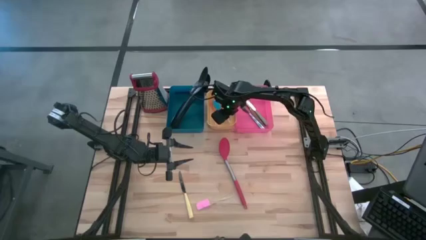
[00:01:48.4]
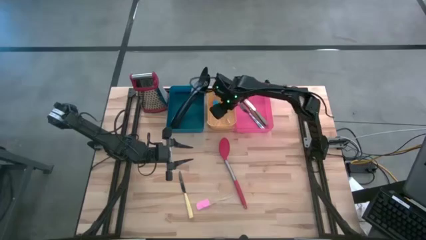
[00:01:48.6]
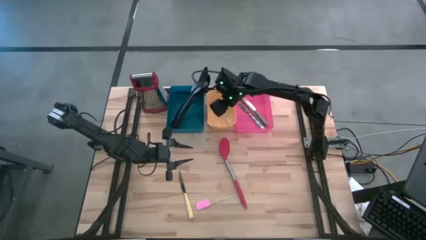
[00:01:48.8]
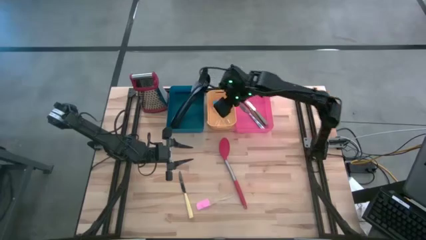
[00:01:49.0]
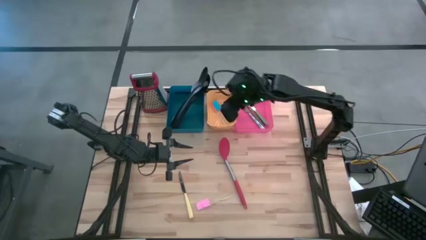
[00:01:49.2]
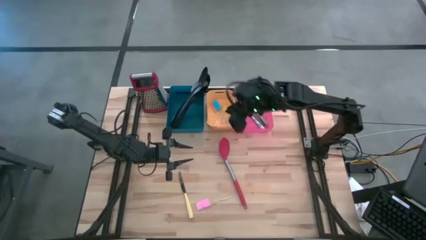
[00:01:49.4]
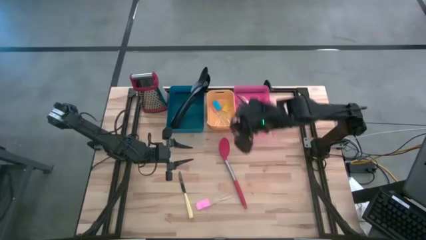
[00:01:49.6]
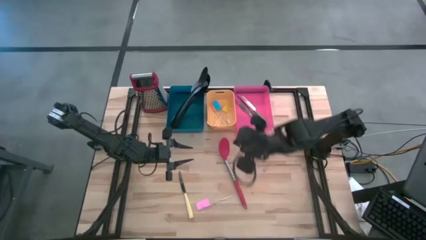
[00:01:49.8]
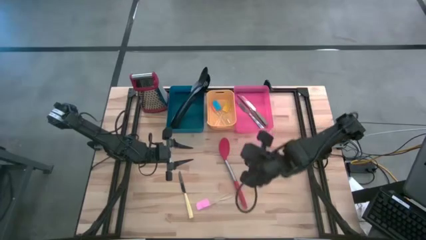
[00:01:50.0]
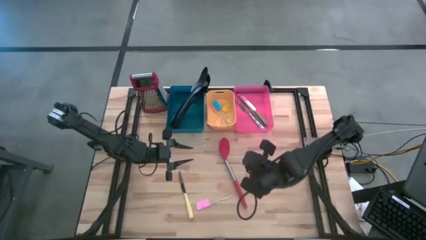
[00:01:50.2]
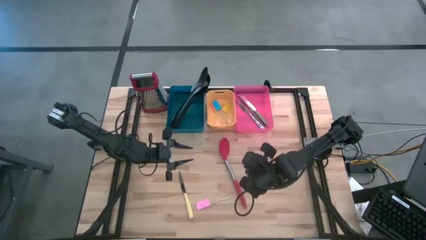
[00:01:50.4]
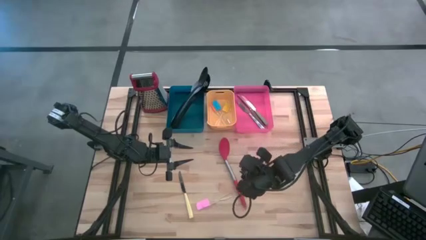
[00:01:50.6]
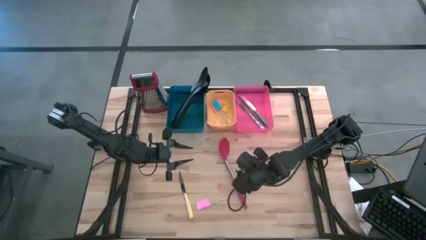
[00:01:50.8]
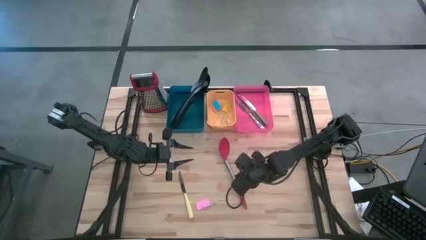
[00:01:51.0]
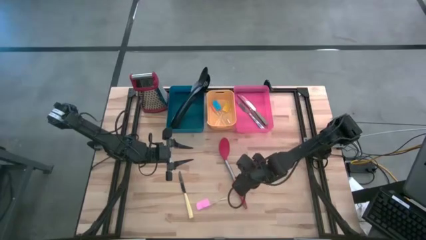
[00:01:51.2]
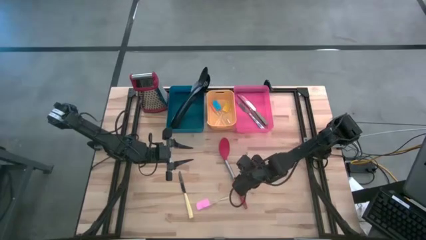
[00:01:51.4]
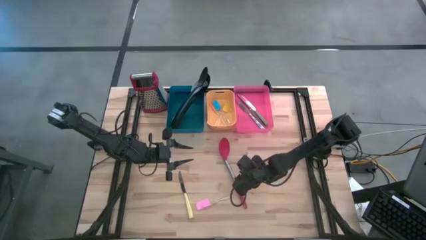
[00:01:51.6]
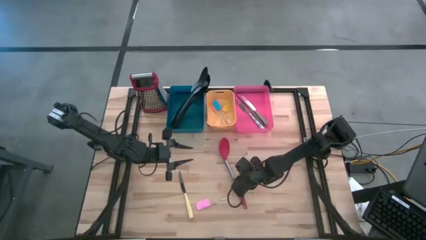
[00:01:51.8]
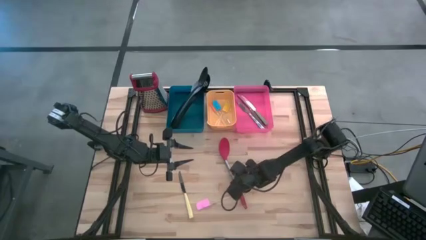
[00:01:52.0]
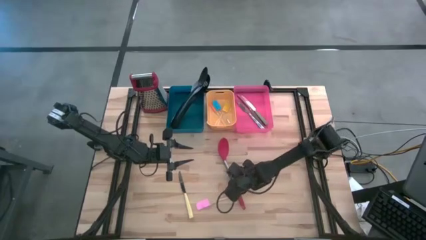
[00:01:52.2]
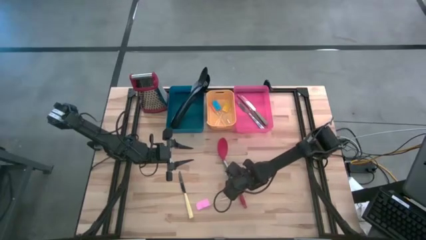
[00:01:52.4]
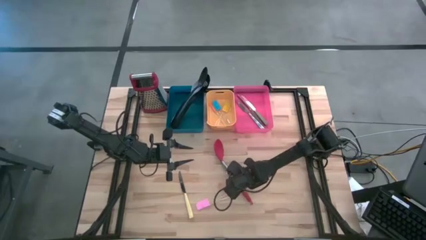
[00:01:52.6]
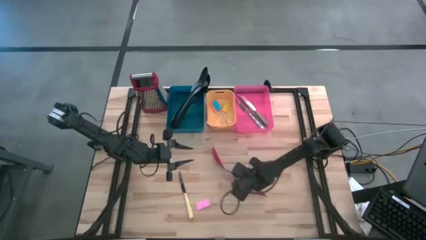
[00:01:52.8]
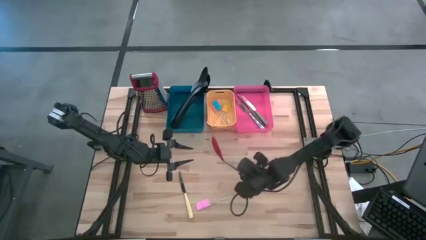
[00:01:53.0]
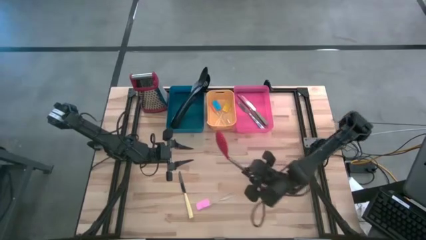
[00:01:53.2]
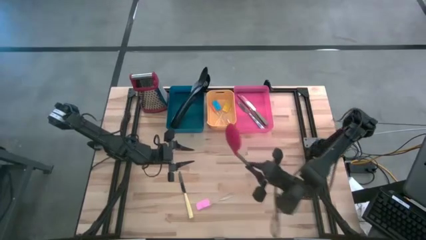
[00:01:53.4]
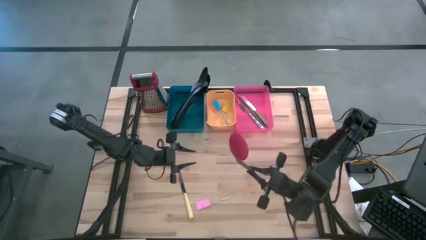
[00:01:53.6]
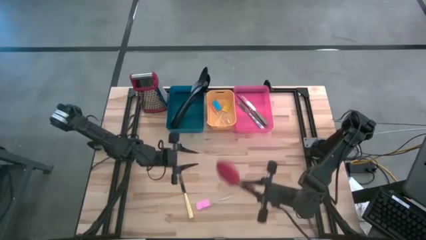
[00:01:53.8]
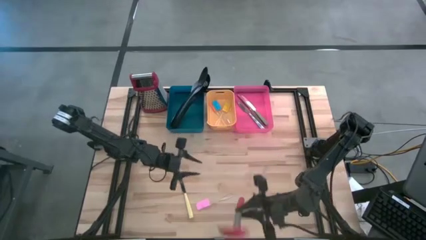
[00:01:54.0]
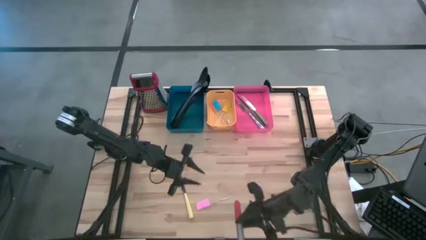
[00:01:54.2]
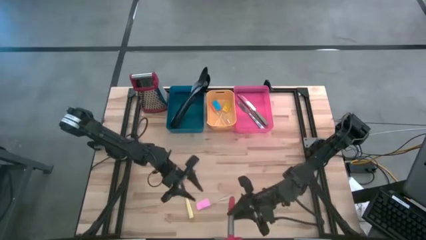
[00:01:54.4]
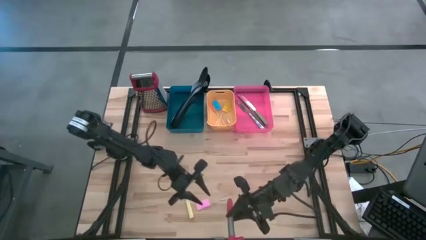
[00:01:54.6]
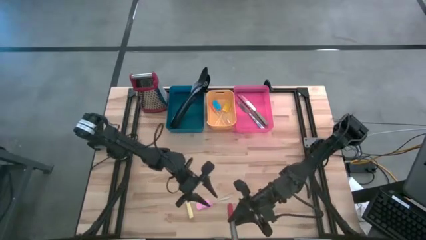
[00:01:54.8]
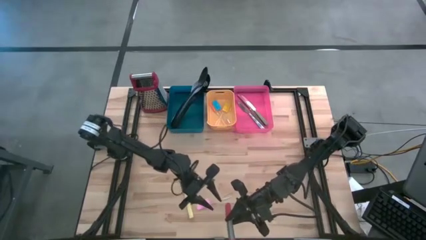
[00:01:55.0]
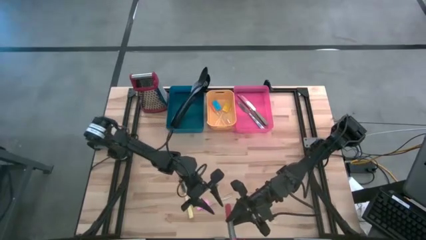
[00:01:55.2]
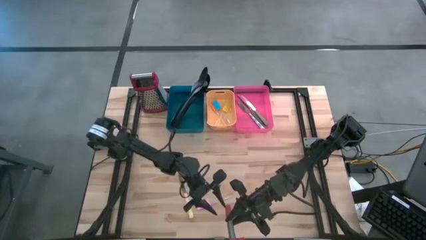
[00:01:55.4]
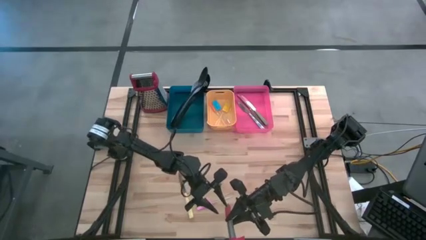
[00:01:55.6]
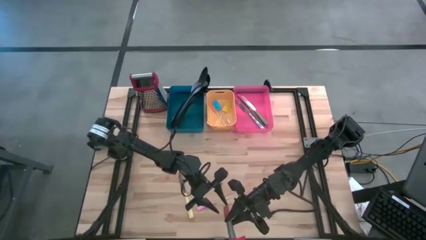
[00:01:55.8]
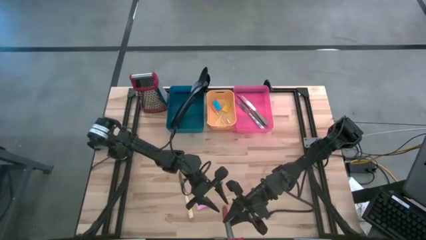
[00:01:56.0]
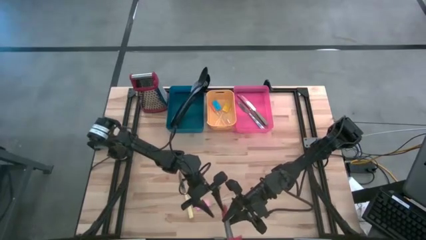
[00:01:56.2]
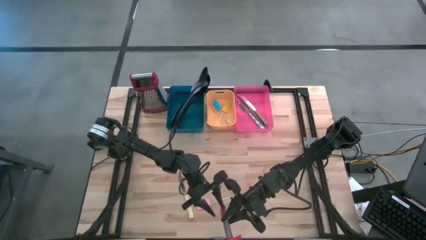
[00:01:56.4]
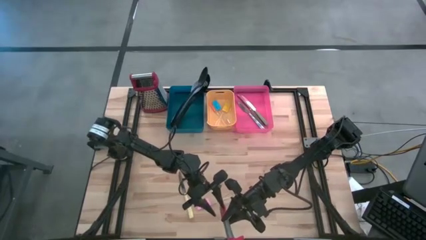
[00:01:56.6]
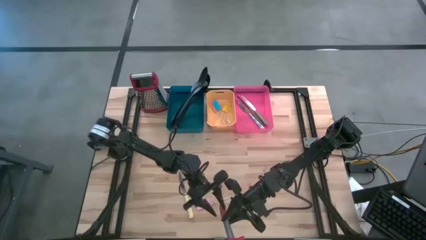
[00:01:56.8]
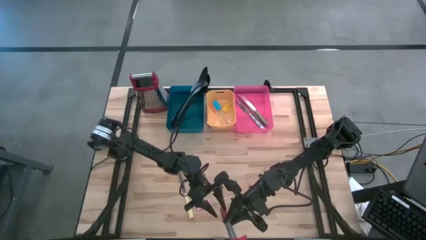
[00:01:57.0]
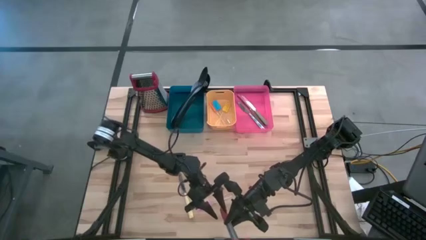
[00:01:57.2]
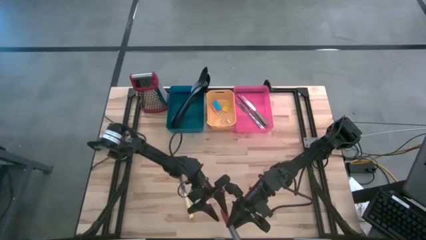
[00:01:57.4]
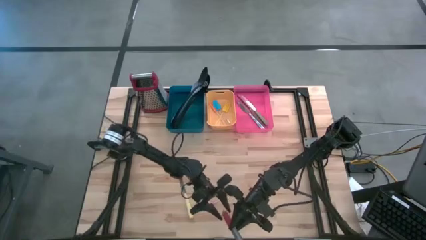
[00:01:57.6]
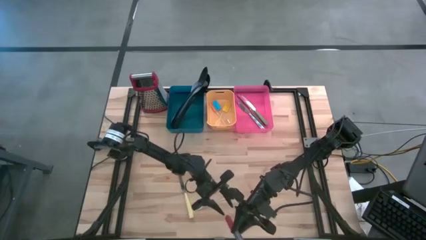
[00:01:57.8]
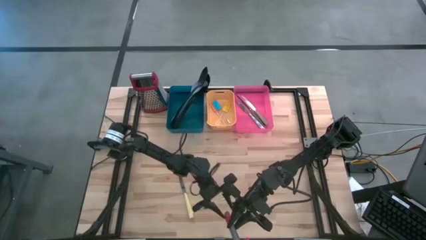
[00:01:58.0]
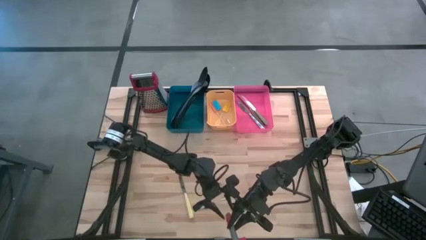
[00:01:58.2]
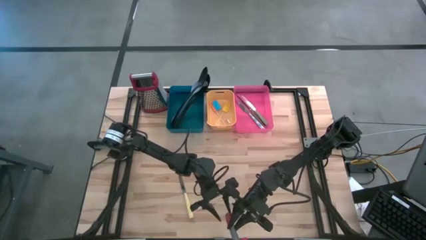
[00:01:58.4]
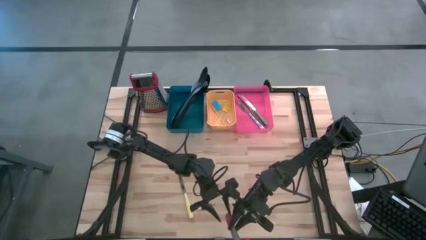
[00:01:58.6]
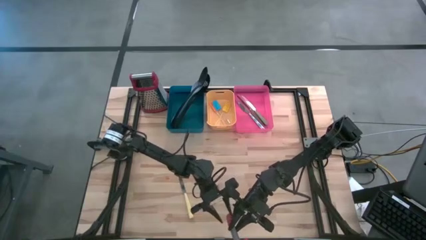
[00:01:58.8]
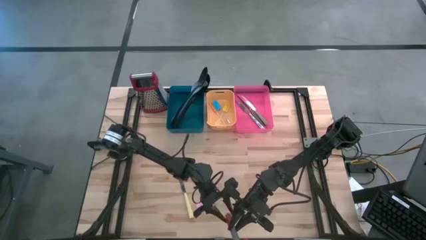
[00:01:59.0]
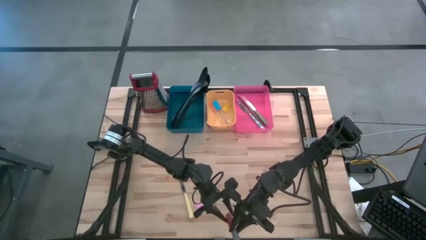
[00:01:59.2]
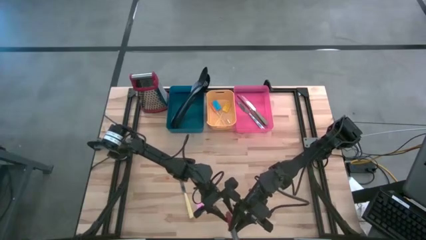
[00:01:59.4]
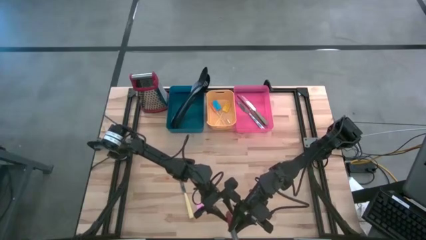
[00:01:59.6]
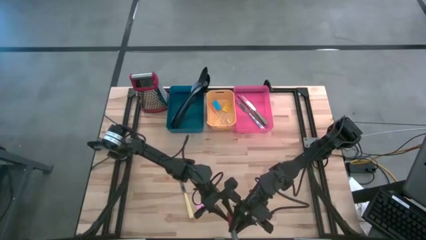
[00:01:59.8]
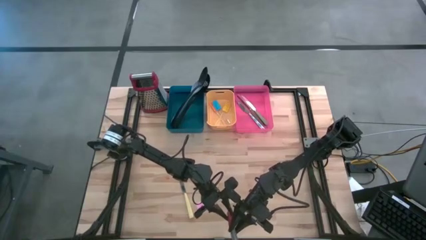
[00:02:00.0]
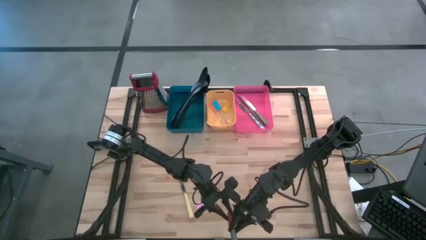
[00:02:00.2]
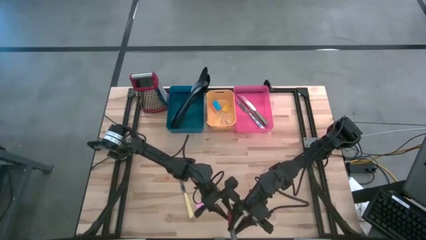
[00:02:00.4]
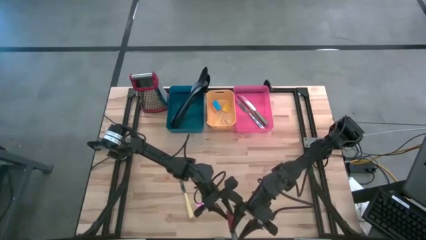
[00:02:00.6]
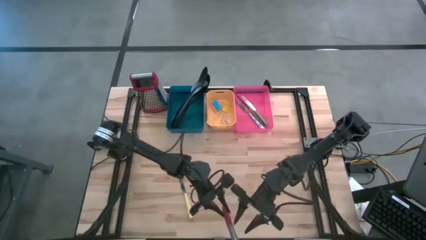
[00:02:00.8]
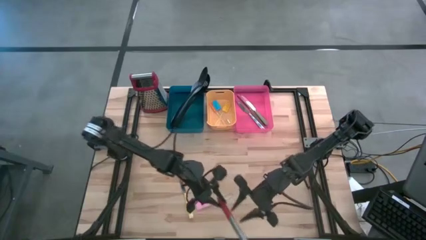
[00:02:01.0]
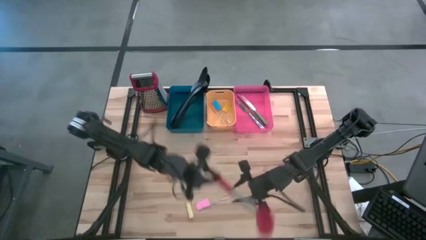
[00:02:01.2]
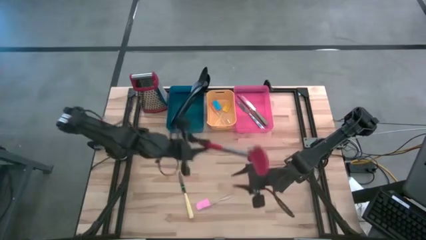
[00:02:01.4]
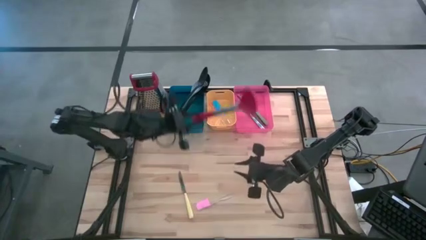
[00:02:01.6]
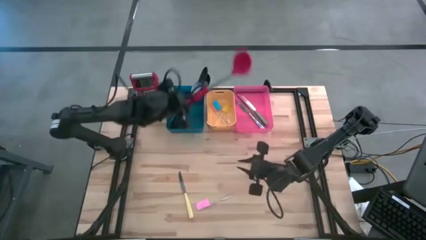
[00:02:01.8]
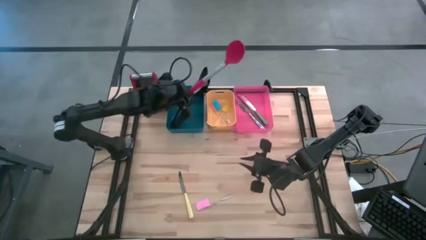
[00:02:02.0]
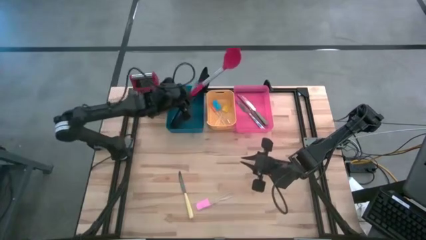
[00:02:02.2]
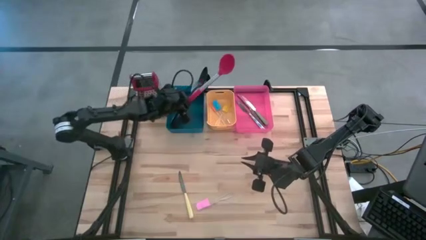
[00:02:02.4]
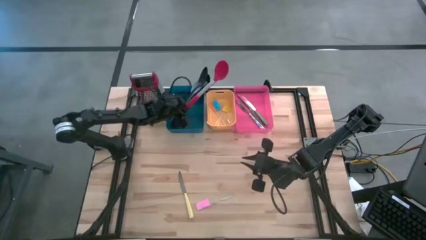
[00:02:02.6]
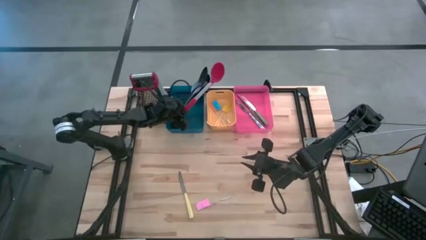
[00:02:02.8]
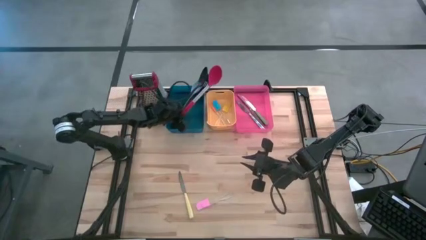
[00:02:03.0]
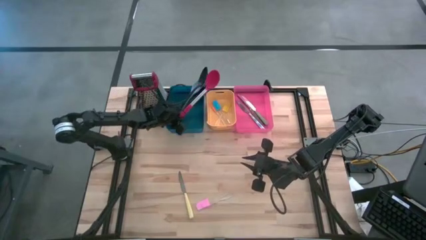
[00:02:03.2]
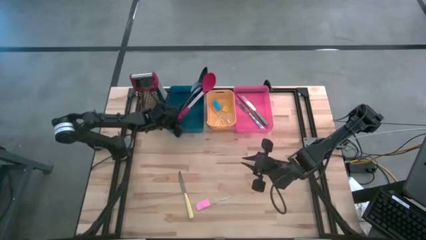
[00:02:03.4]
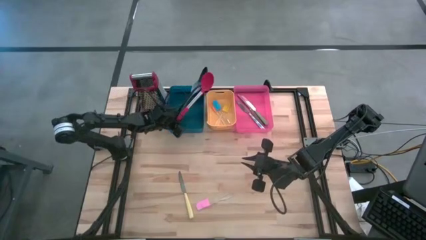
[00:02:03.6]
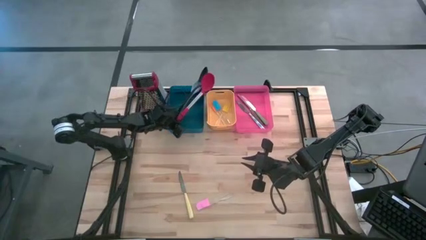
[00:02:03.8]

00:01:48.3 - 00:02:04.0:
Task: Pick & Place Kitchen Items
Put the red serving spoon into the blue bin
